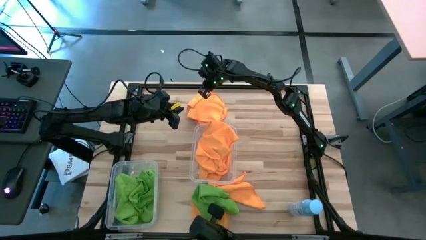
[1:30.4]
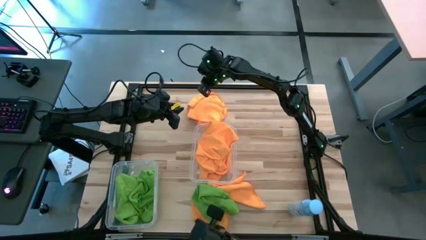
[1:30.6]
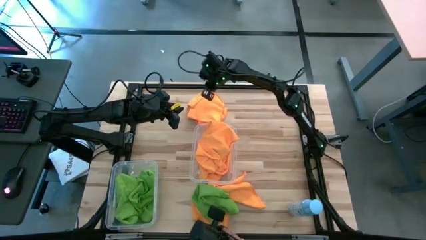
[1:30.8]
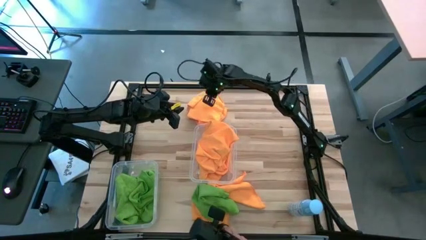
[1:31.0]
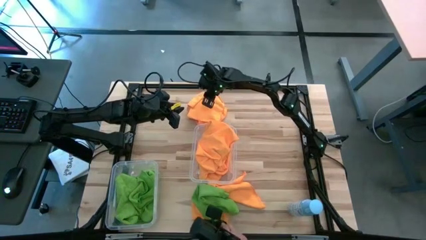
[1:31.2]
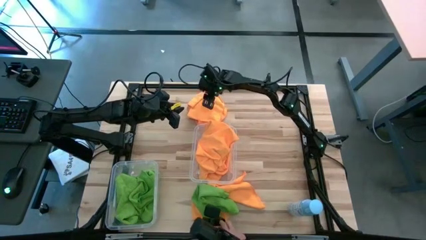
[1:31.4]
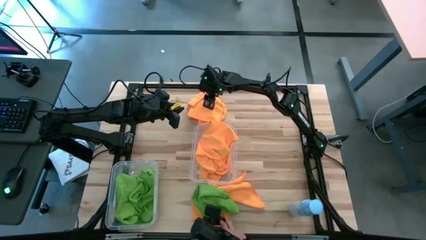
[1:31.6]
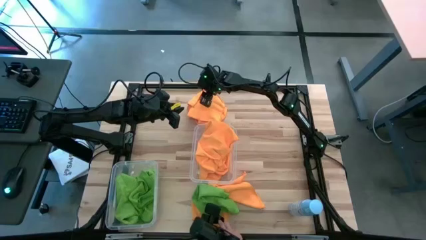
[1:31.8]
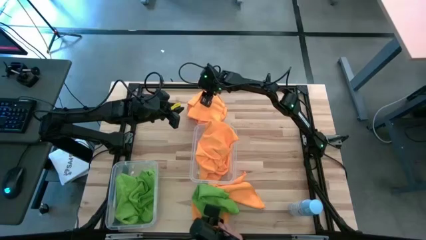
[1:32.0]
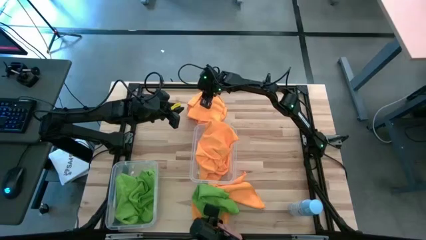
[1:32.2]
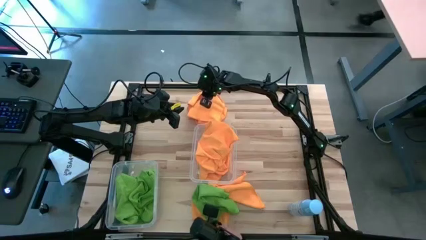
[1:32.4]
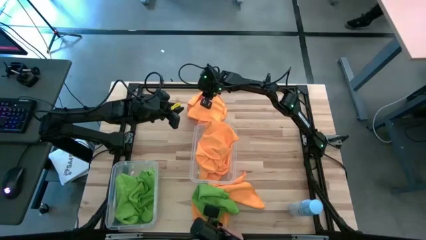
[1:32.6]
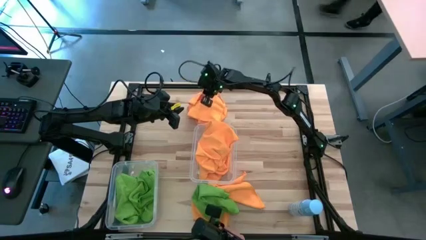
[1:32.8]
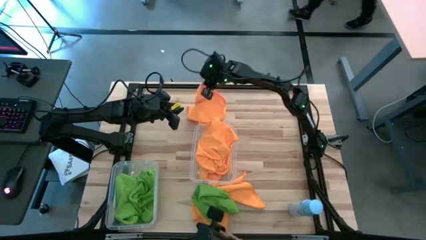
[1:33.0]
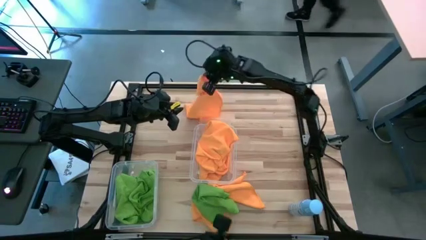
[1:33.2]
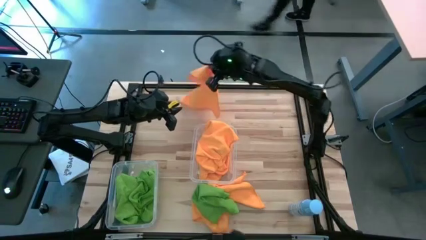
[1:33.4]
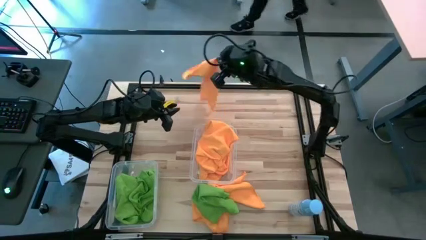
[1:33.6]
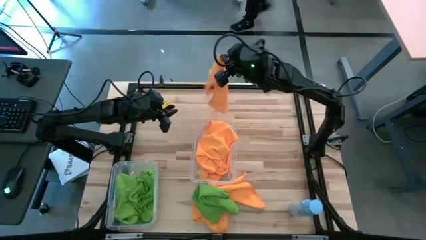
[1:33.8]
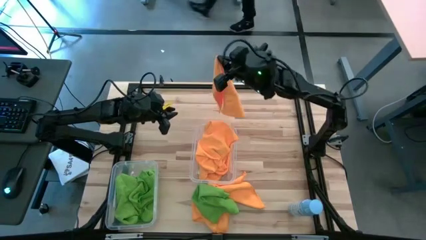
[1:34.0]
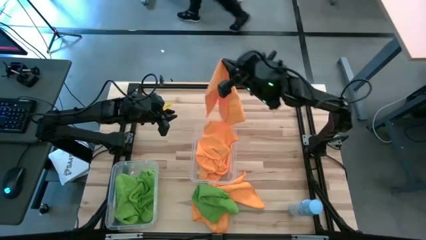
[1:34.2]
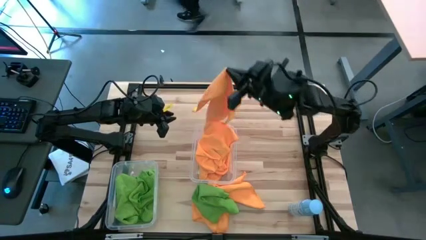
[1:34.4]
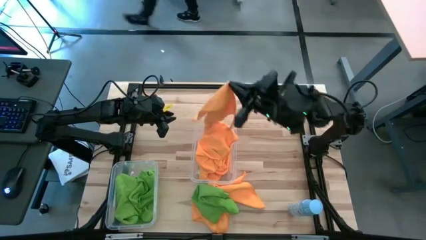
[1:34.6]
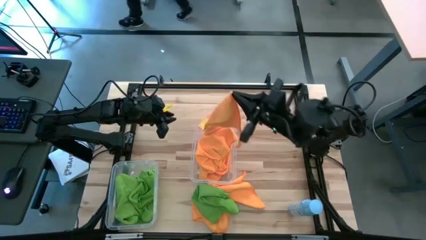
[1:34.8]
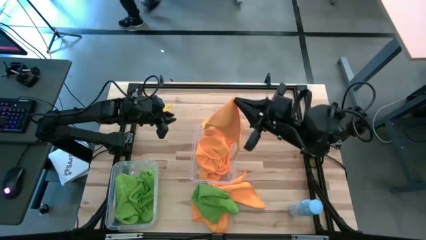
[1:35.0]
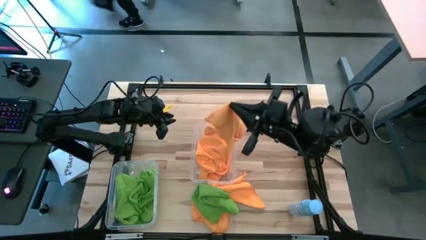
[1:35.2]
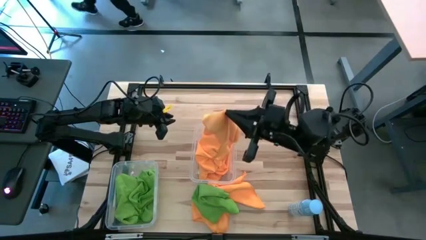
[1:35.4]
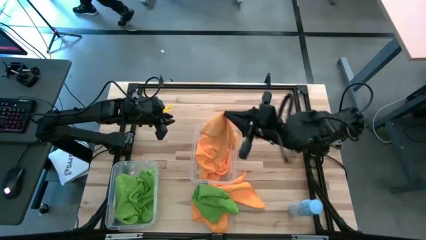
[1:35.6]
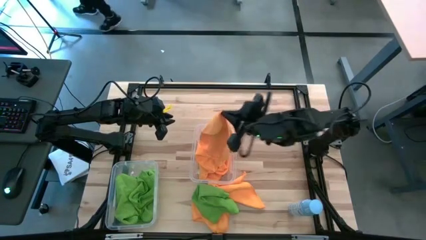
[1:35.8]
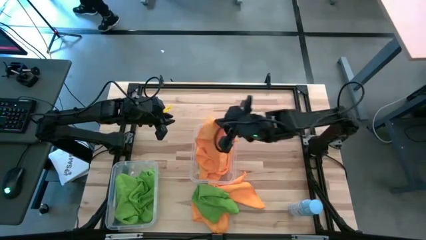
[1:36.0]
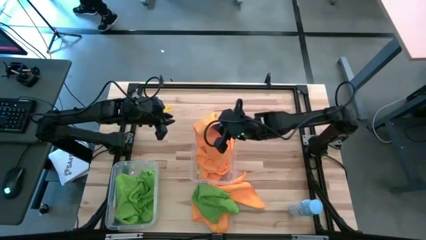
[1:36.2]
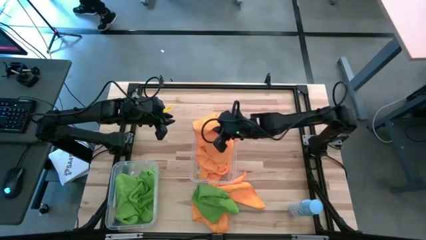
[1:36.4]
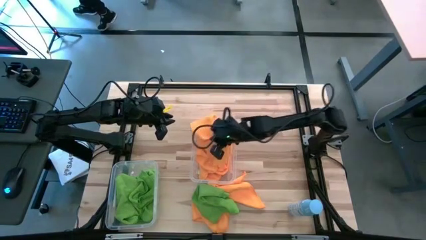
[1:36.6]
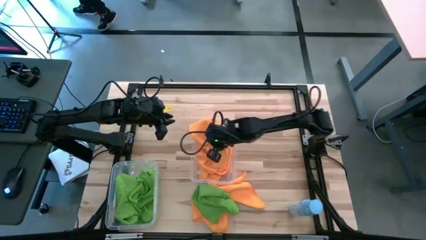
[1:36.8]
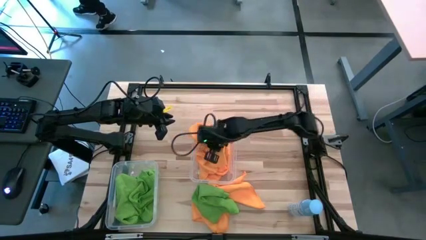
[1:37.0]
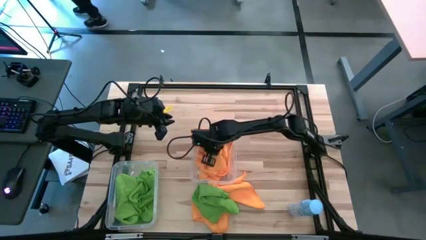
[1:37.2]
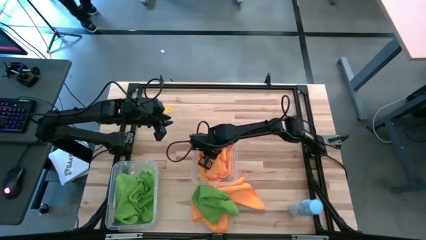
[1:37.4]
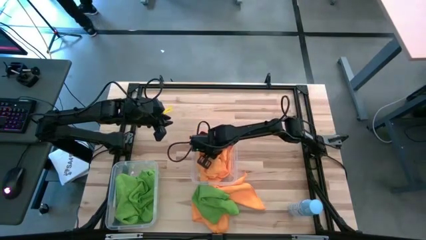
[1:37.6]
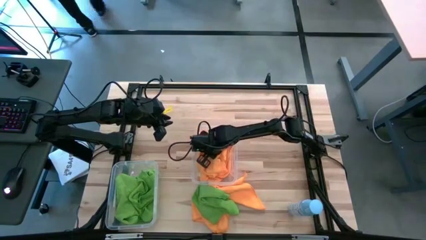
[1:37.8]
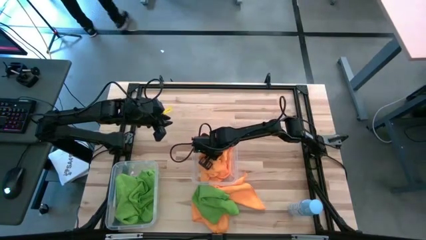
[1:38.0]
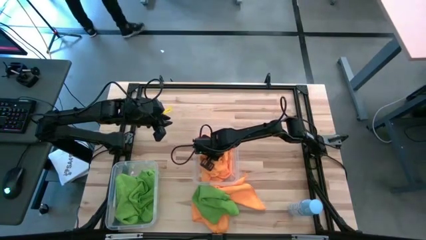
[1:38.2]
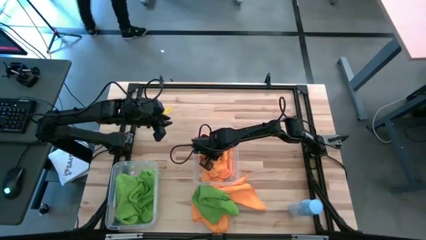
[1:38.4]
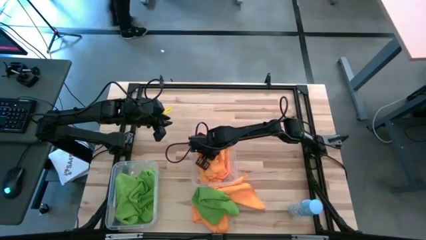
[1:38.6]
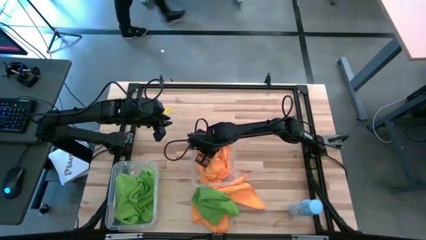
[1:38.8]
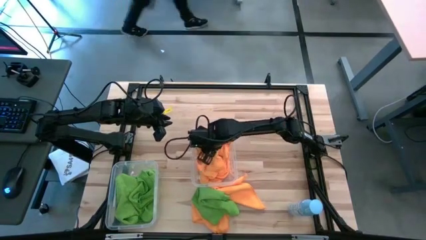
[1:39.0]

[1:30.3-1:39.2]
Task: Sort microfiber towel by color & place in baskets
Put the yellow microfiber towel into the right transparent bin

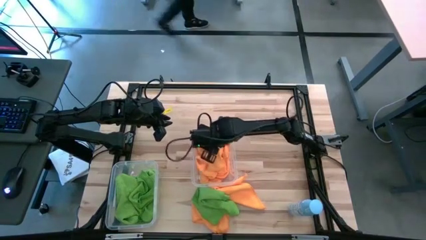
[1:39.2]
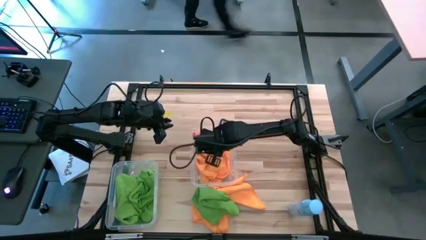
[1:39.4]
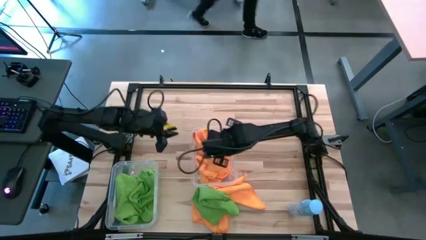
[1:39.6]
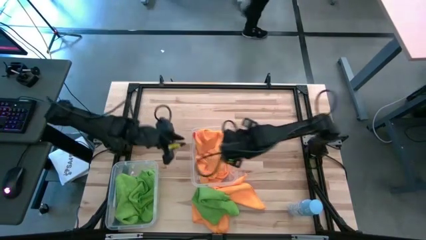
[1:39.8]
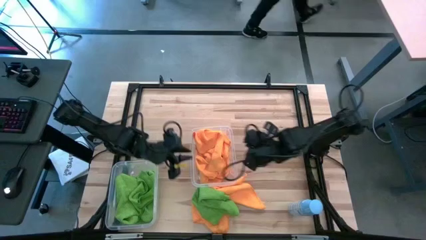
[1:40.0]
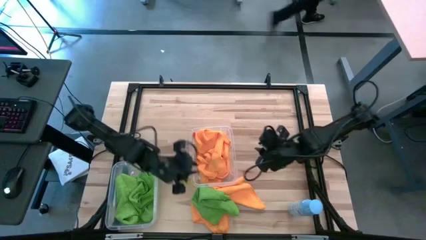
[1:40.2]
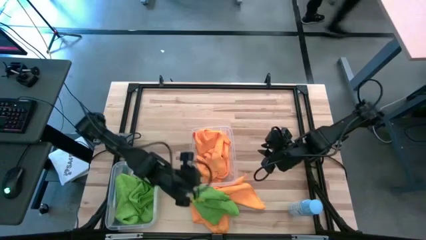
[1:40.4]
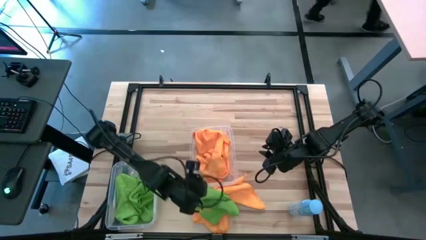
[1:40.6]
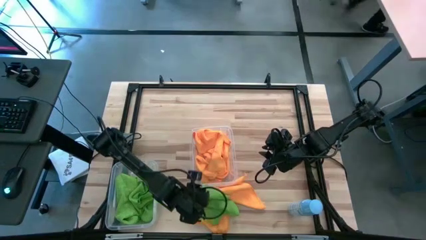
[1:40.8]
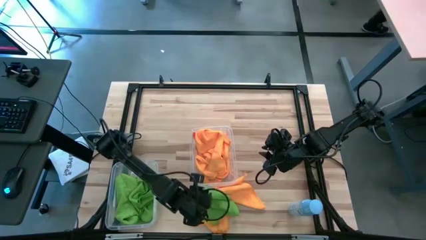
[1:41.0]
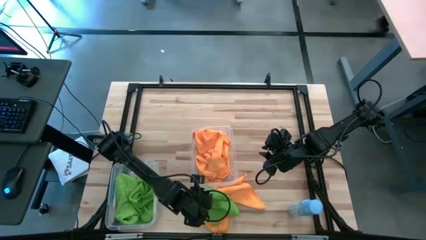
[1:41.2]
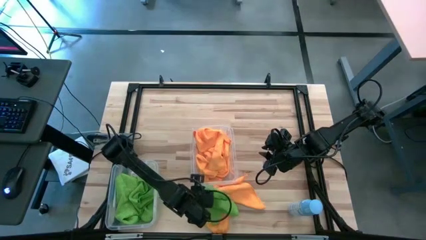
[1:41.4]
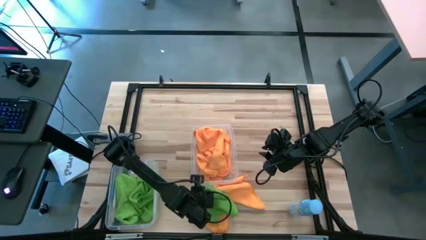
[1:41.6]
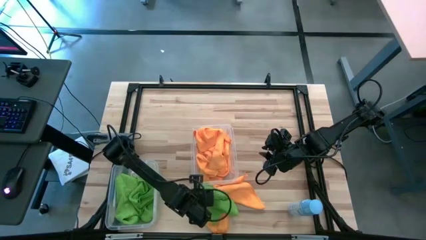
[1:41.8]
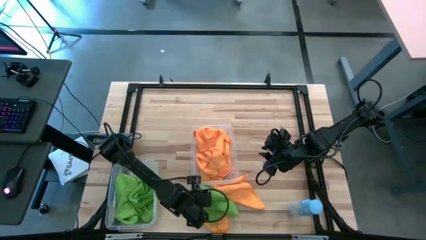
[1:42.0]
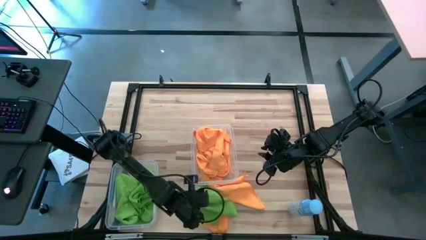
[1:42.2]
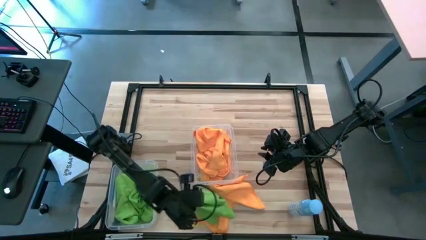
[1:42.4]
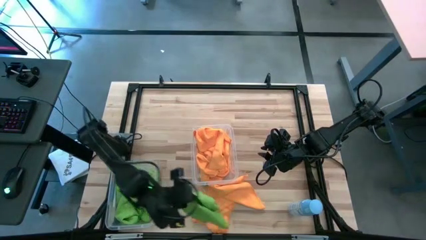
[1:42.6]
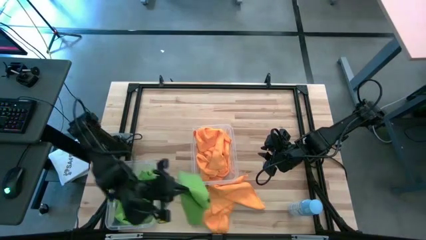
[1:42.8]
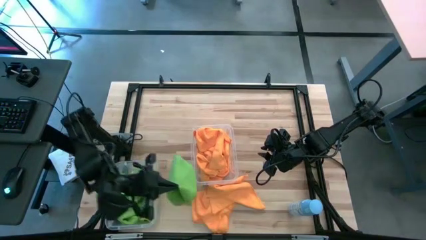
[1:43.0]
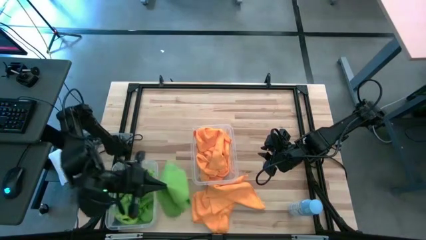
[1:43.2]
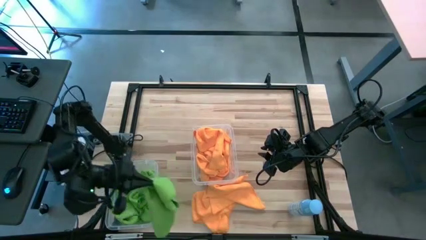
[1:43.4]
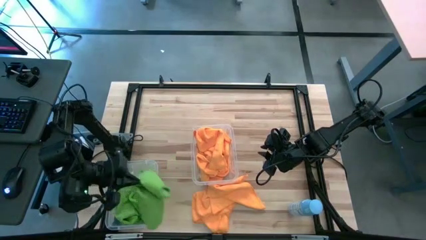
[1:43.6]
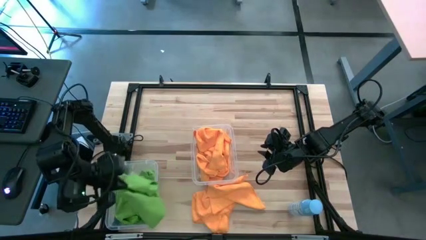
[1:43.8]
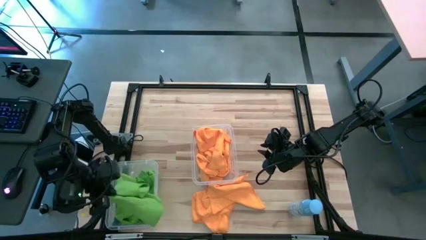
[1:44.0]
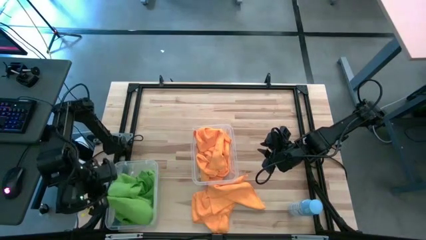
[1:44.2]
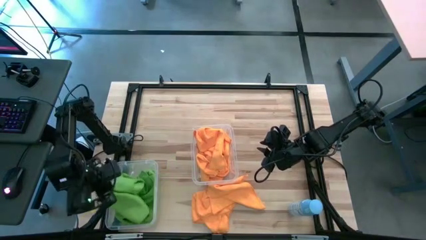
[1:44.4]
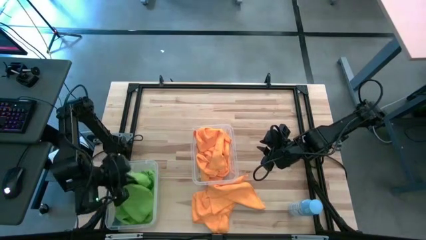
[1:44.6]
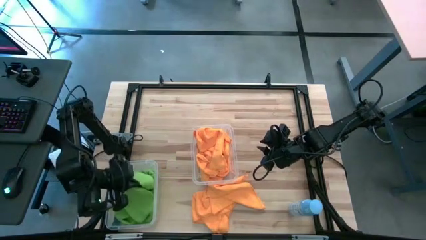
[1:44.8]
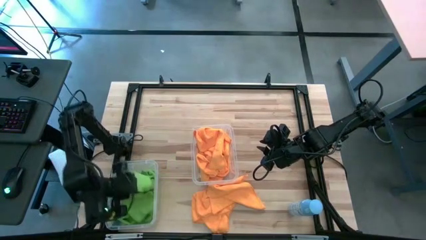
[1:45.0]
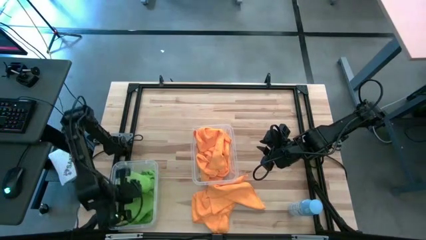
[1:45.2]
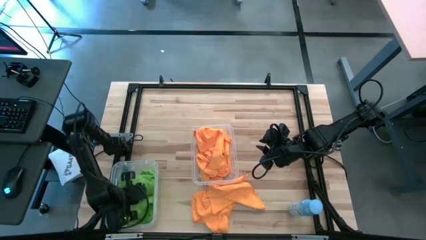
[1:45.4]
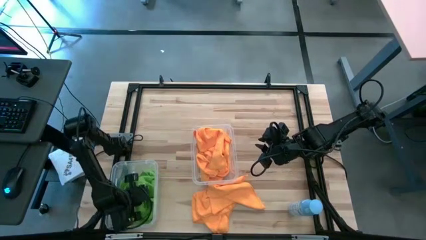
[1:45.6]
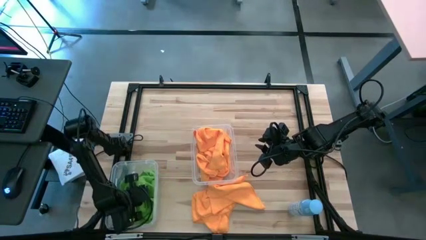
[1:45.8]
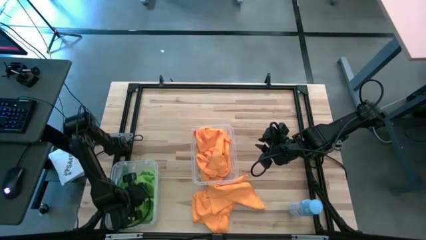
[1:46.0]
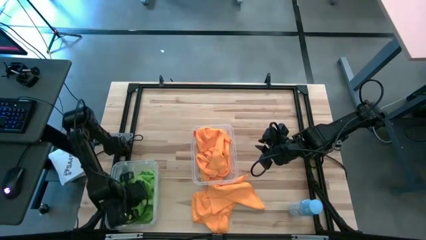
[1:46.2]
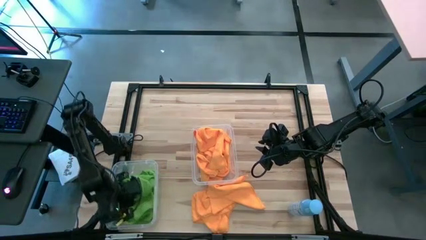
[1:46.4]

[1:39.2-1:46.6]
Put the green microfiber cloth into the left transparent bin
